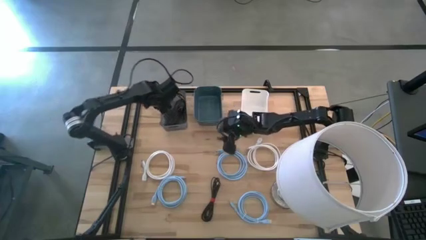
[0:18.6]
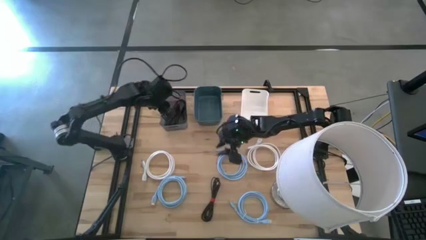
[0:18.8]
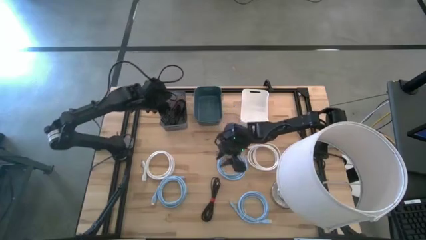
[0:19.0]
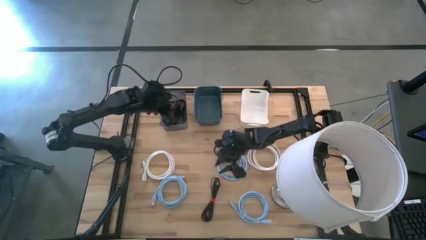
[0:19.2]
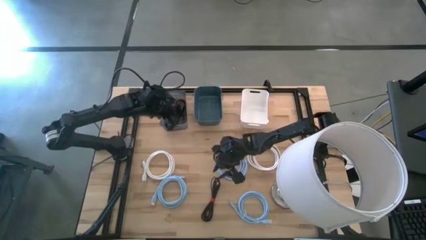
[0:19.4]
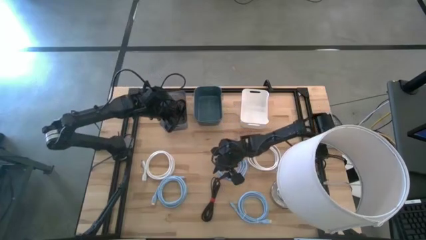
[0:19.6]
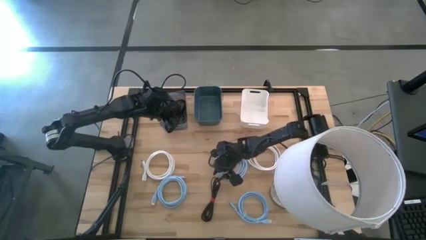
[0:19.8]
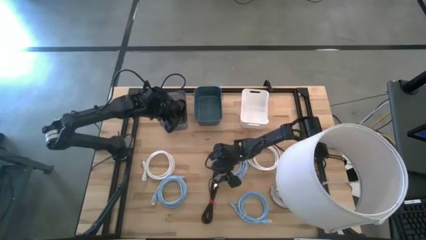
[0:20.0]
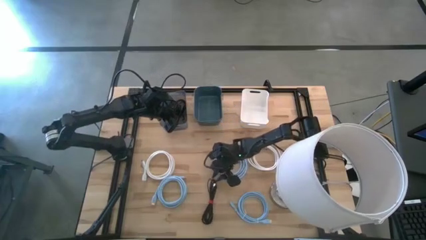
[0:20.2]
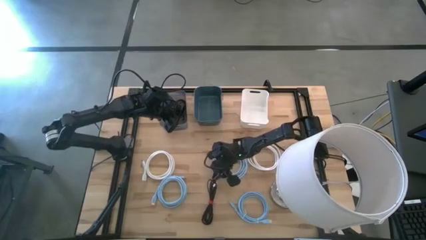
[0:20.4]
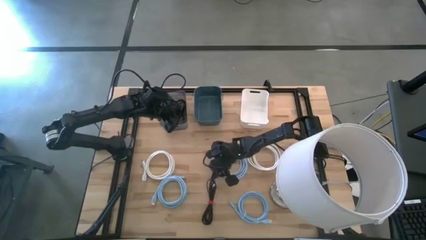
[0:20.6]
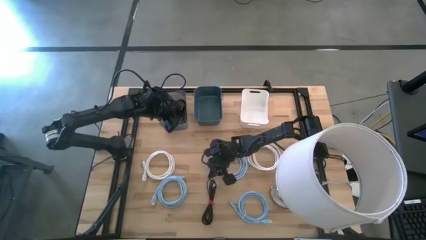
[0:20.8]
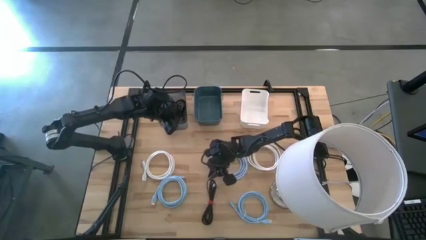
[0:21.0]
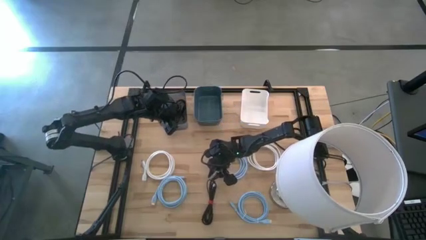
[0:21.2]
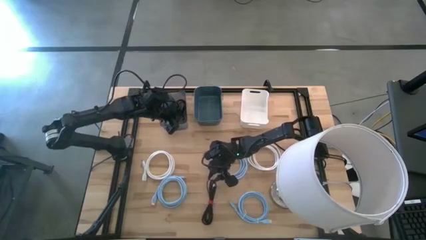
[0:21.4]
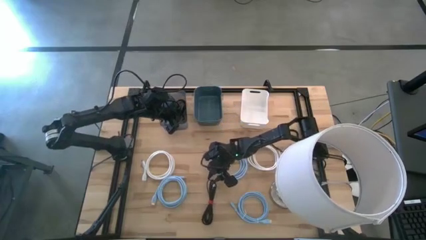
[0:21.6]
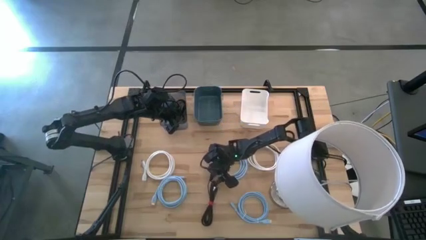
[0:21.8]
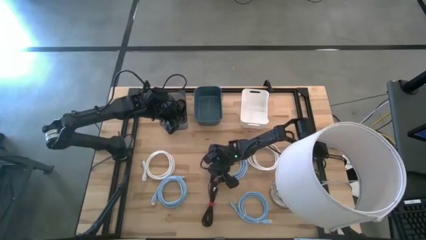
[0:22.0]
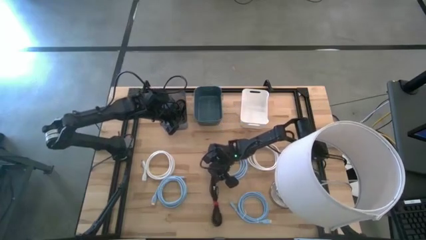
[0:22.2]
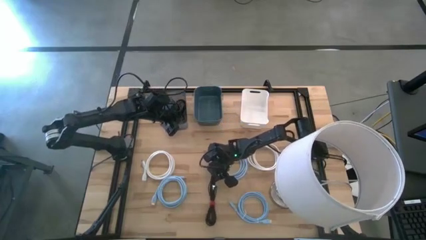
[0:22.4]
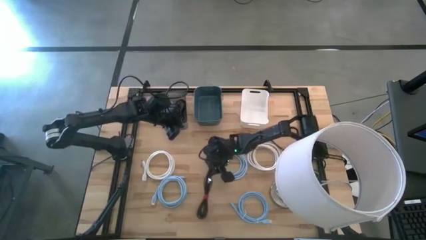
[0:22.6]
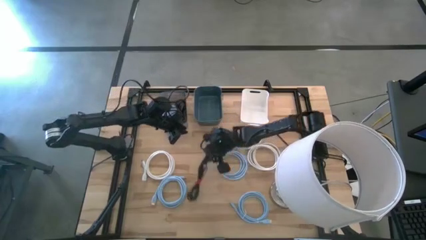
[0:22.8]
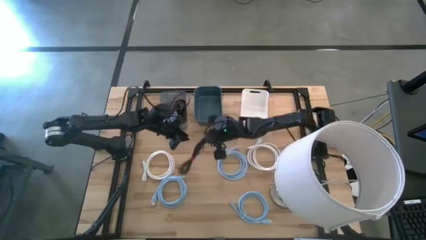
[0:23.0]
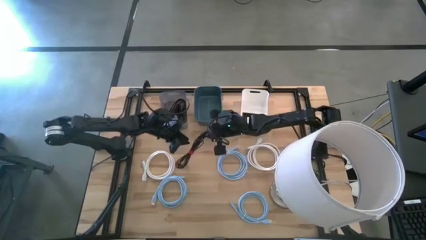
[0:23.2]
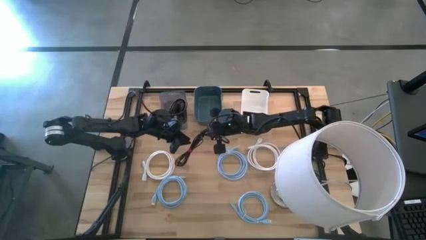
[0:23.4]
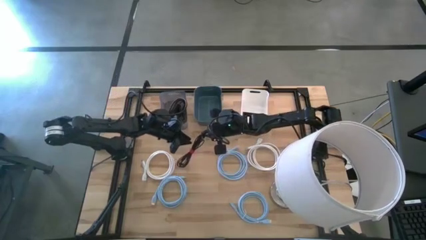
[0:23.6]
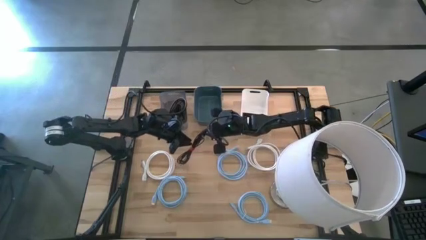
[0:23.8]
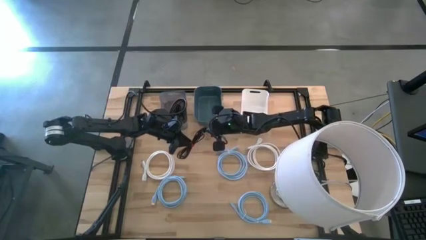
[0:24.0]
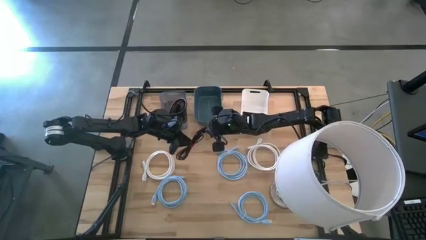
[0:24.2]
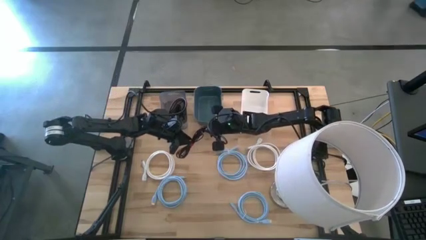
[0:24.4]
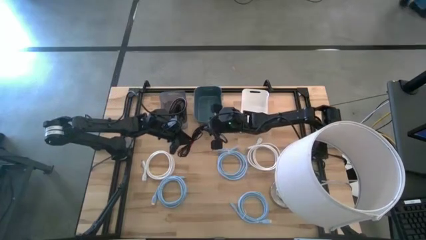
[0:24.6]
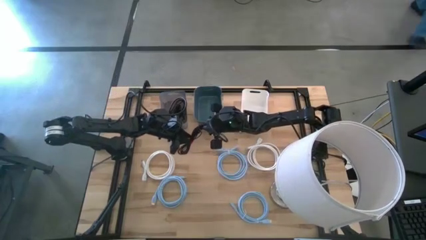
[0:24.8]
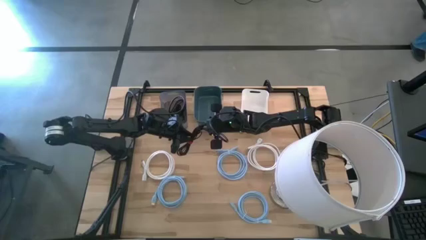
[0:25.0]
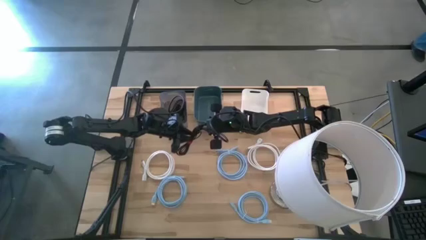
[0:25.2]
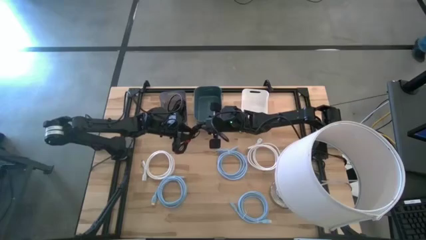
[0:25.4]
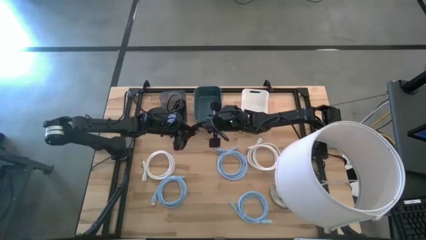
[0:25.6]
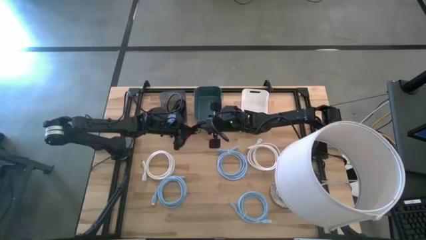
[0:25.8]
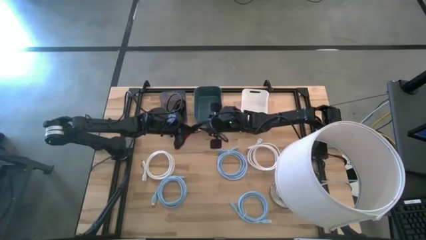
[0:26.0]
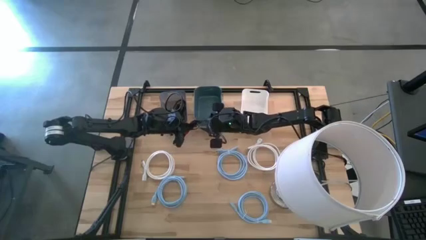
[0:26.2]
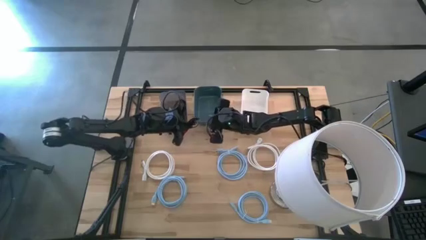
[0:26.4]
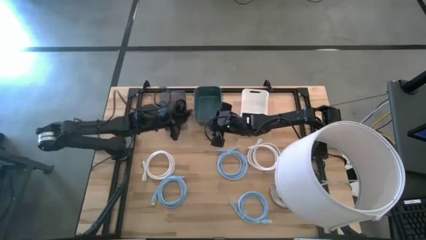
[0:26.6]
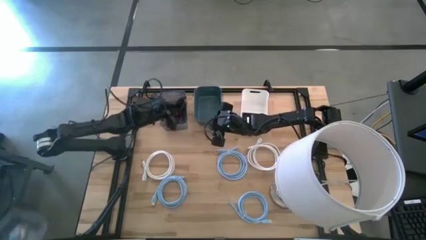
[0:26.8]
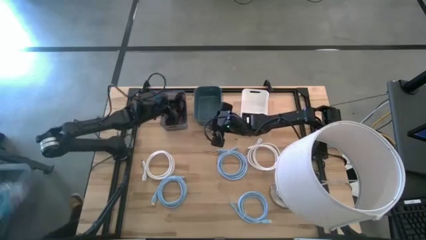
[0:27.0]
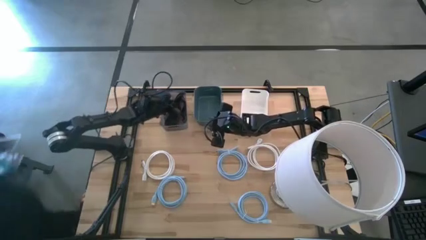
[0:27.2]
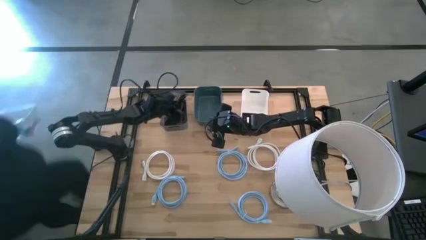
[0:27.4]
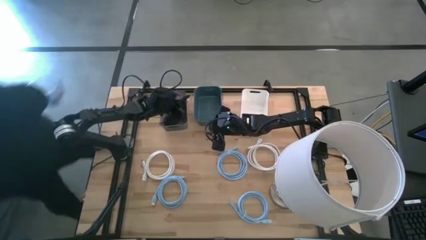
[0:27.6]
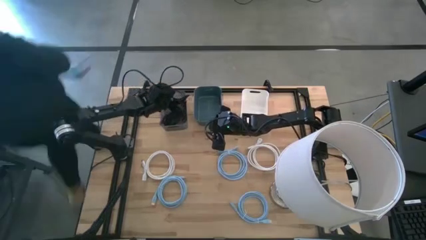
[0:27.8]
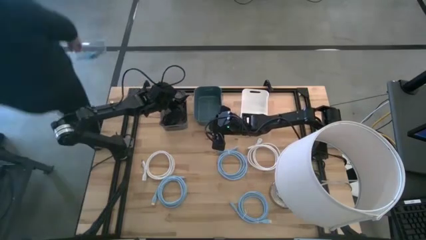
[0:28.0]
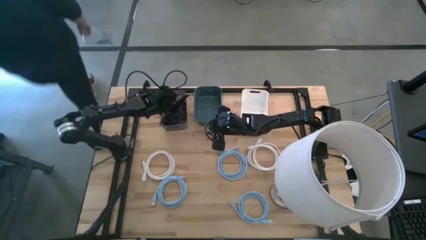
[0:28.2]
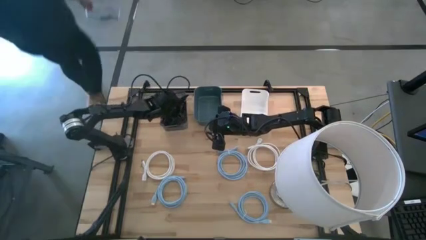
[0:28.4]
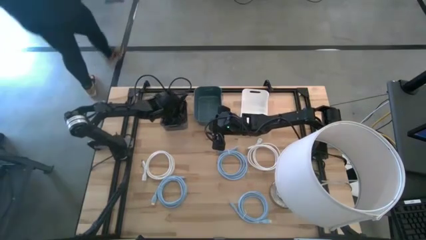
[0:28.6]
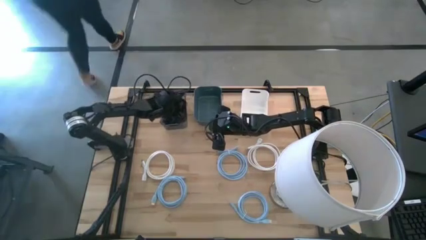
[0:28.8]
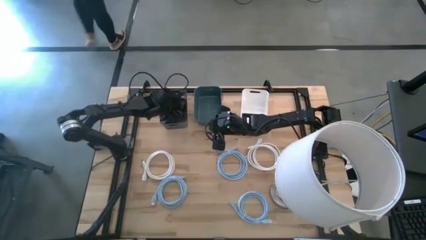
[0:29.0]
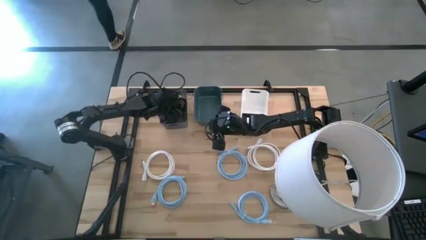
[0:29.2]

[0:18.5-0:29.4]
Task: Sort HDMI cables
Put the black HDMI cable into the black bin

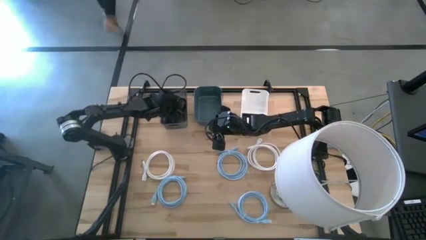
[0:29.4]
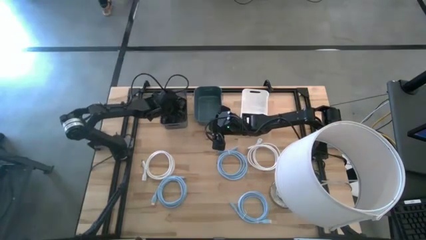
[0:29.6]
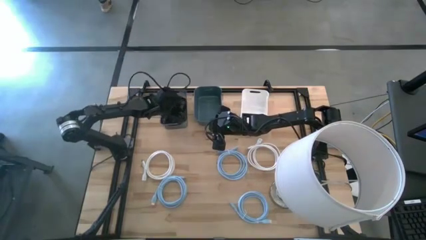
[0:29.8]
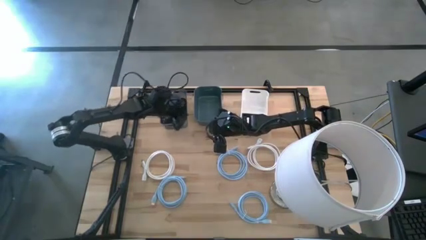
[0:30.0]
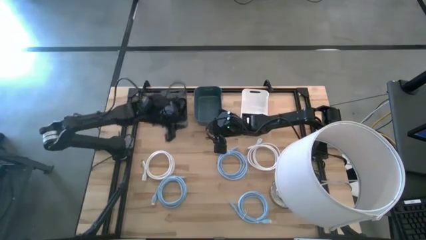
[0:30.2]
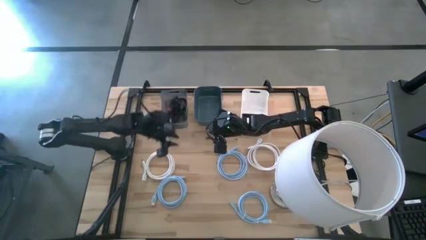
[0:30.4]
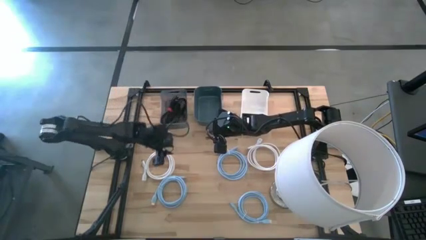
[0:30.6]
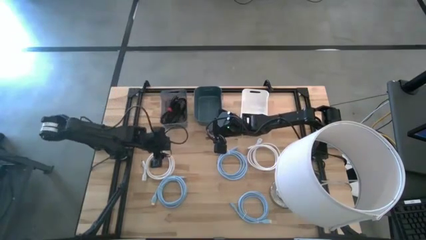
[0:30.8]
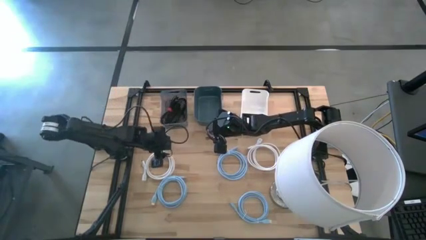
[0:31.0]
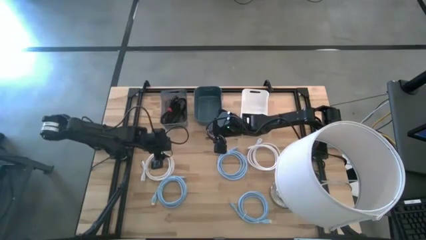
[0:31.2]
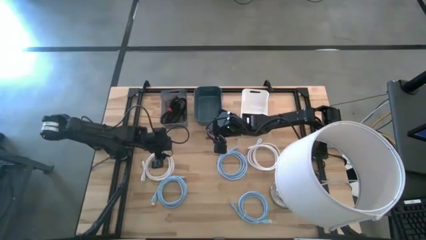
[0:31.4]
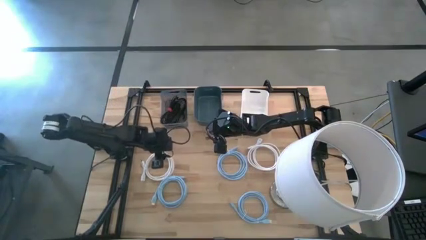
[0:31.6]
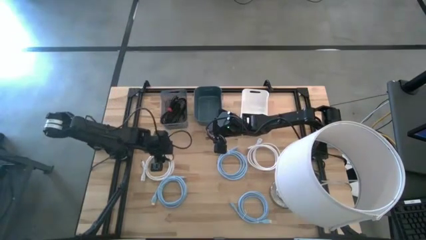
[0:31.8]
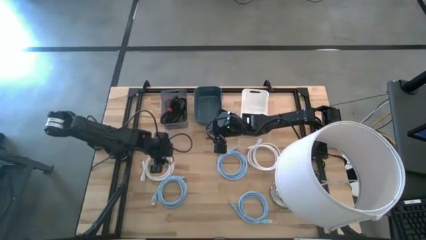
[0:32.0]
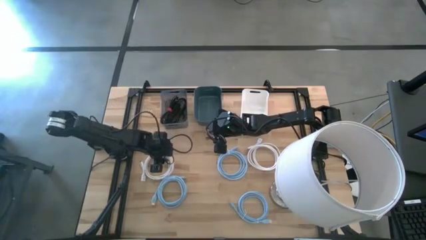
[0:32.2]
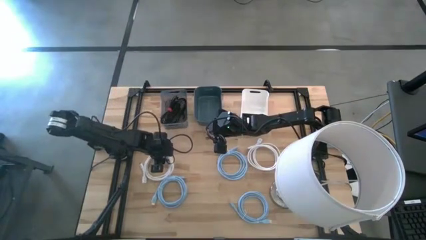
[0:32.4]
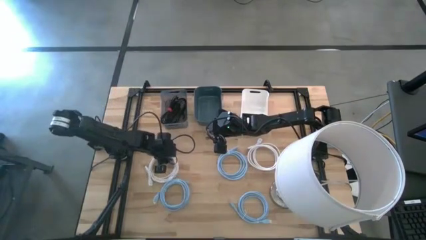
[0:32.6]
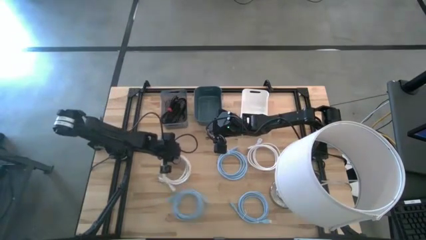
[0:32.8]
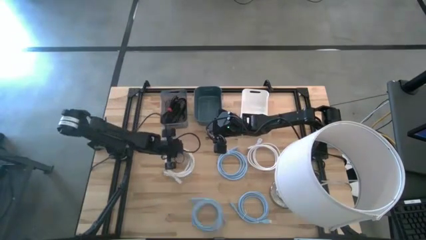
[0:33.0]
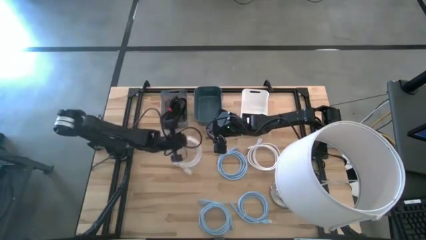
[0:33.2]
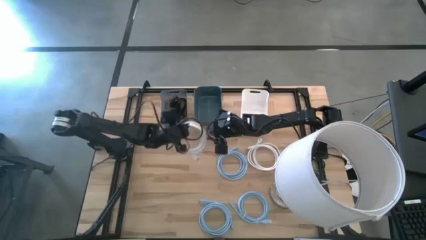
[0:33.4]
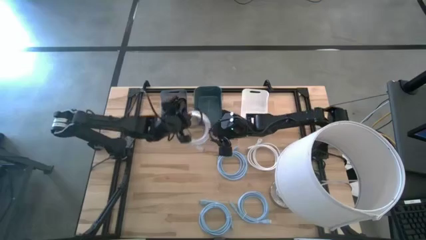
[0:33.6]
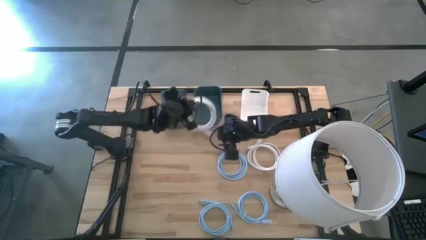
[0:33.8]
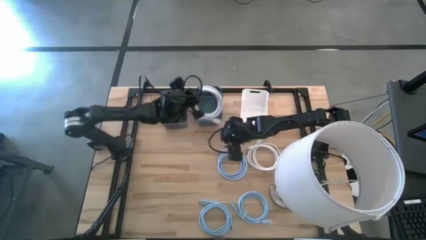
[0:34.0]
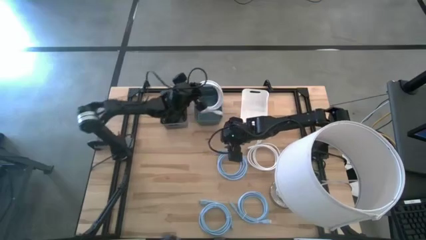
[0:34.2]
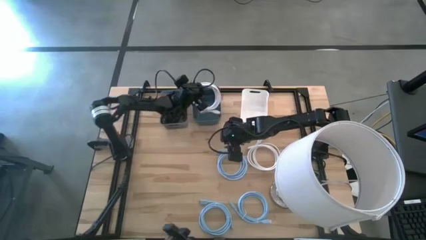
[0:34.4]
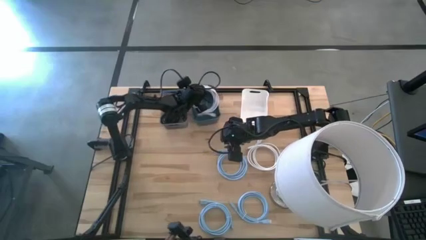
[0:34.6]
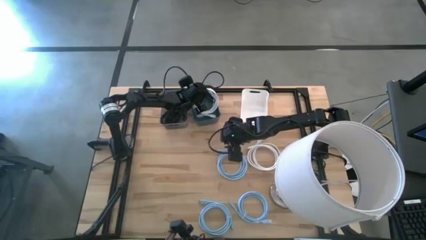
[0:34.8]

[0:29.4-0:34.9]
Put the left white HDMI cable into the blue bin
